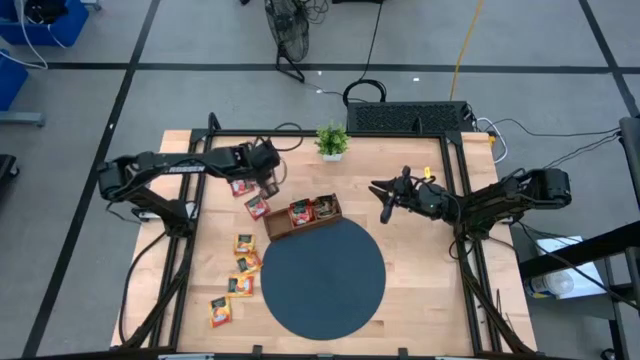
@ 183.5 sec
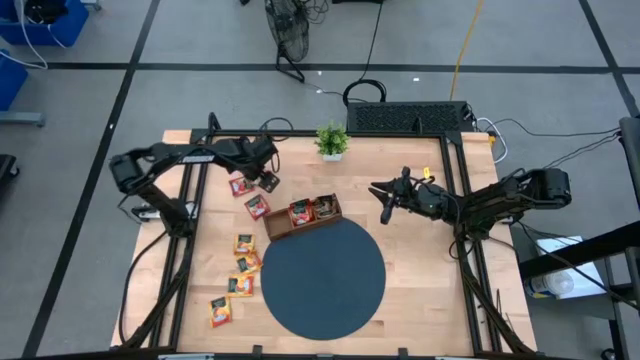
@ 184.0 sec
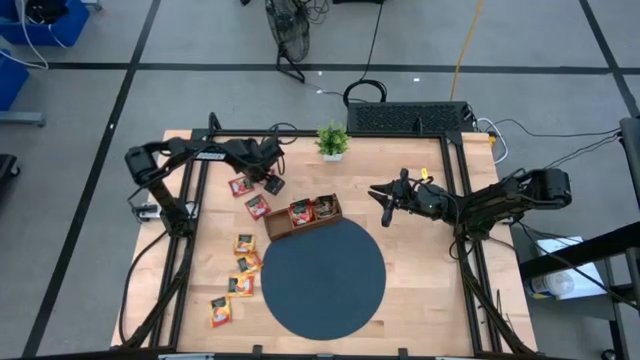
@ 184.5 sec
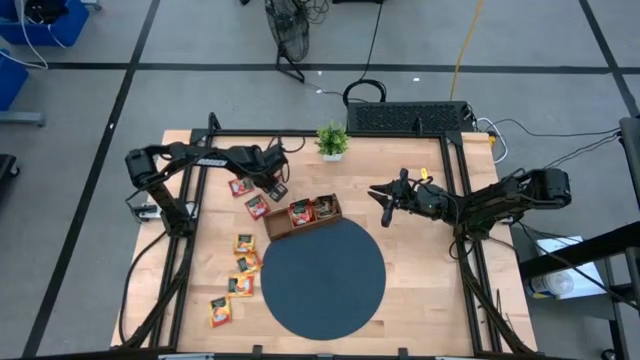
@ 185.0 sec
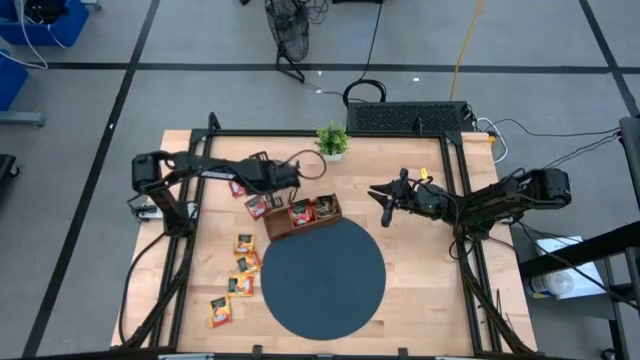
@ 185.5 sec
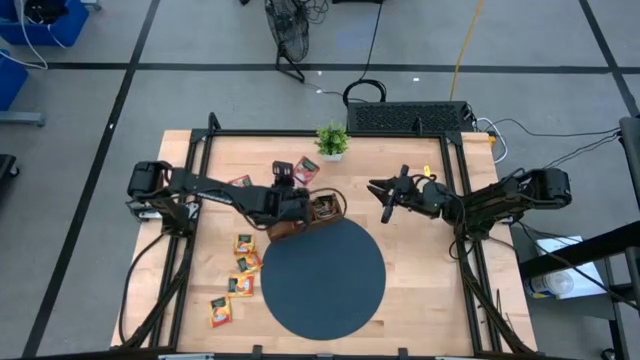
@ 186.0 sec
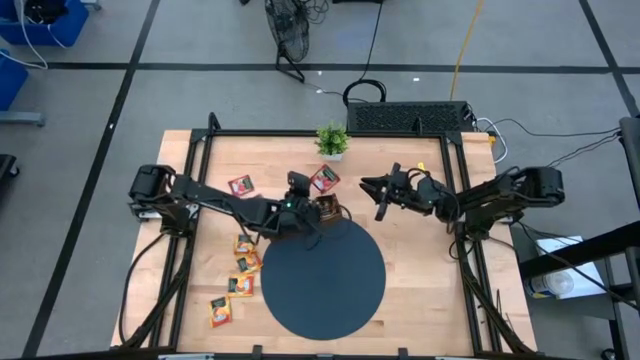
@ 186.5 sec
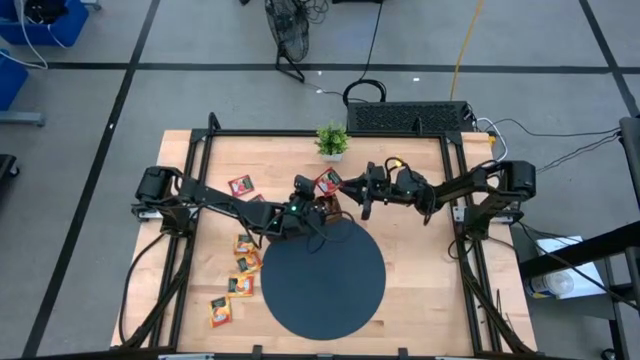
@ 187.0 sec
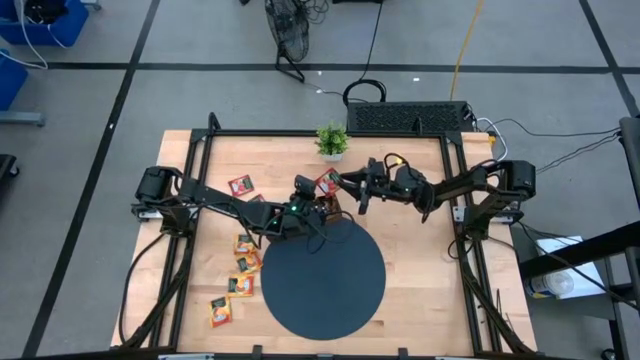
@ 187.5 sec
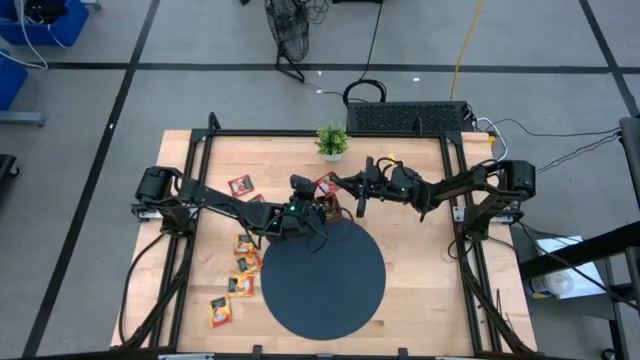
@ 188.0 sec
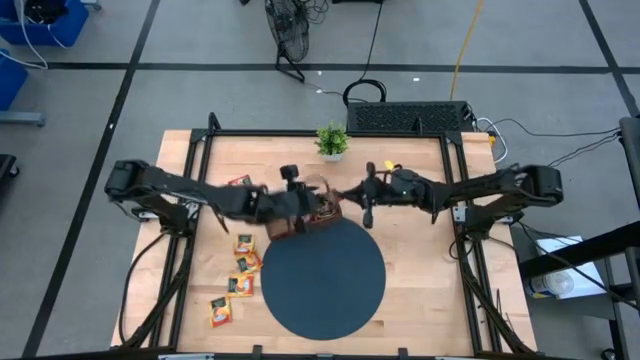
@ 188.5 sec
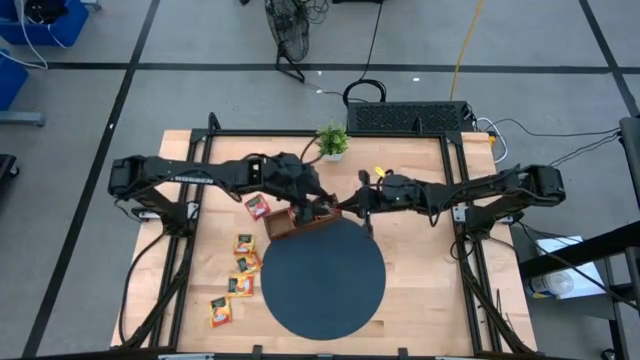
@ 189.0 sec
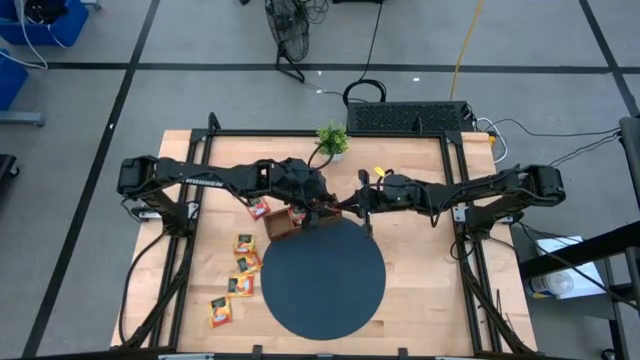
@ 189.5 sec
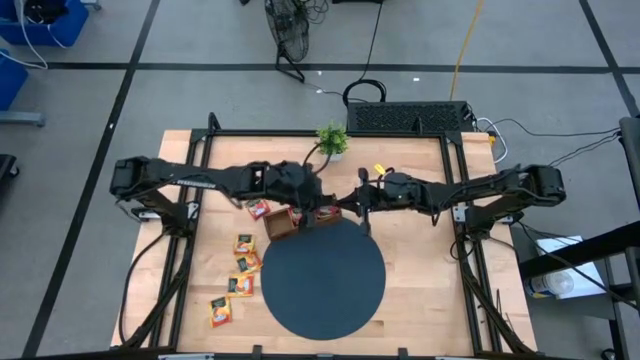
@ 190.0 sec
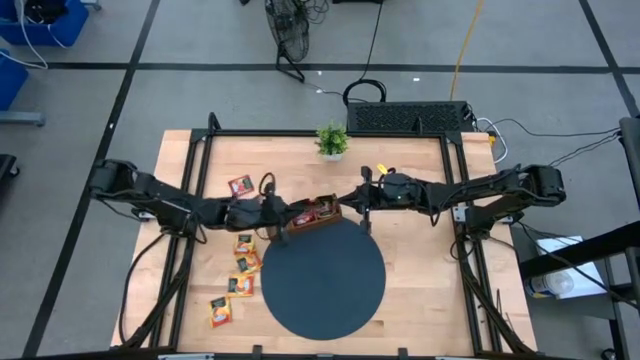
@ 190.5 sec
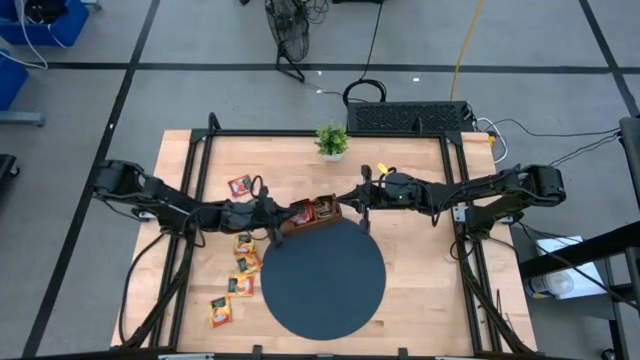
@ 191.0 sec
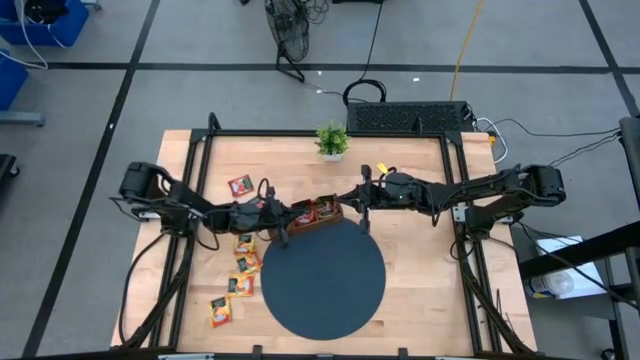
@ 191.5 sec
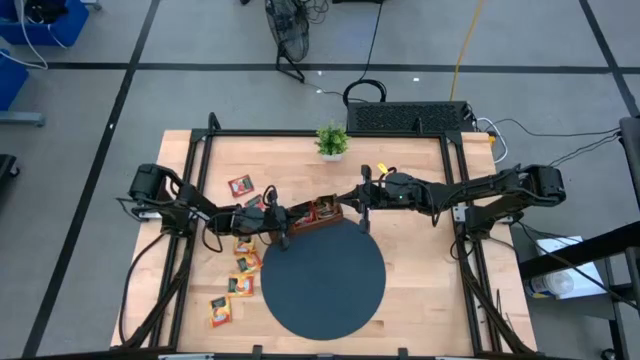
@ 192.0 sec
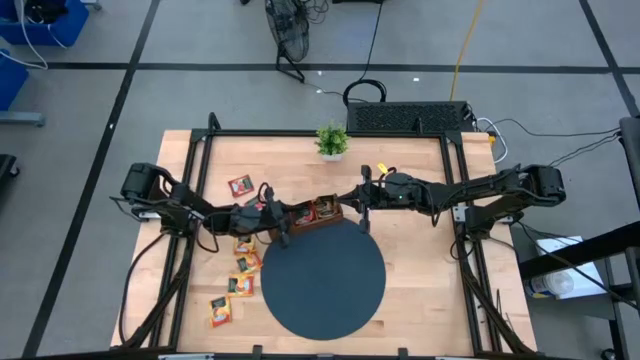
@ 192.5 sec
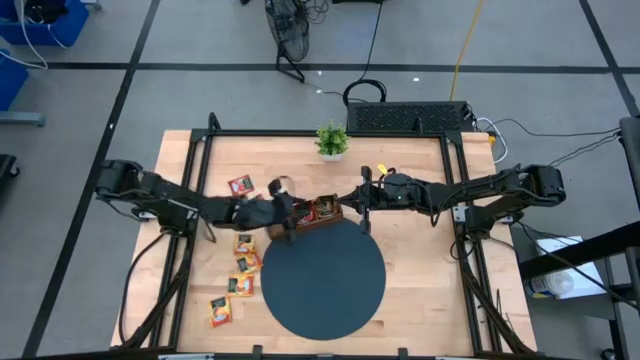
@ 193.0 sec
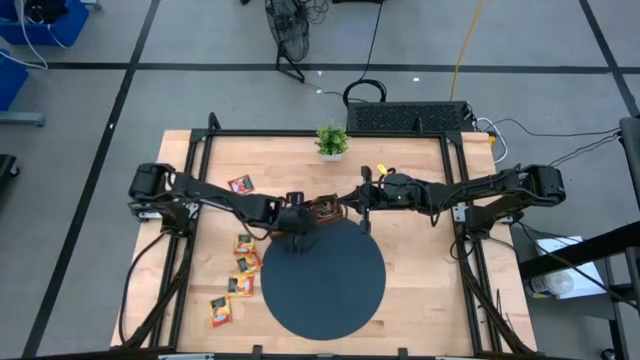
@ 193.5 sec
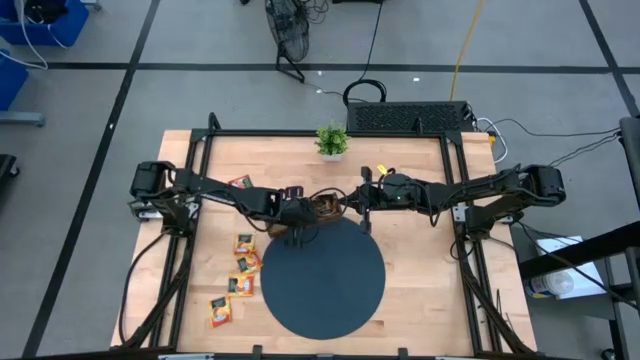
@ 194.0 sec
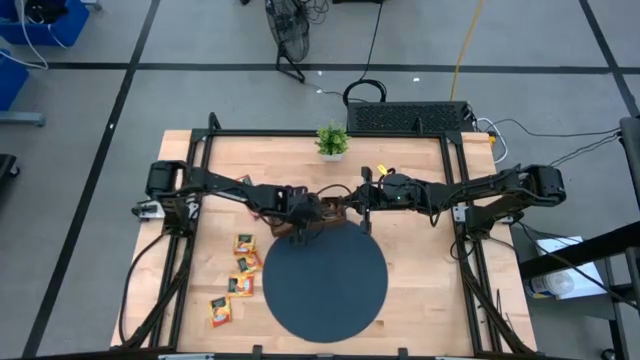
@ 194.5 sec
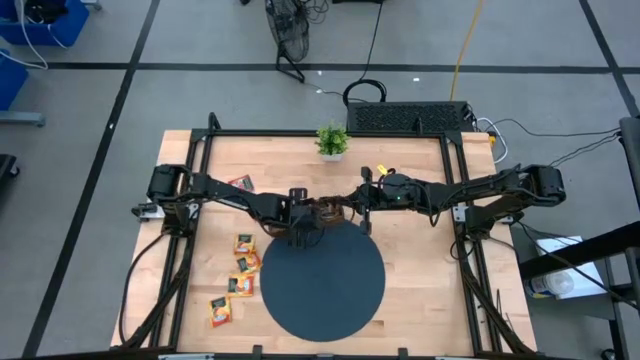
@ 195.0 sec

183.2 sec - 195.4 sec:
Task: Pick & Place Tea
Put the bottom right red tea bag into the middle slot of the wooden organizer

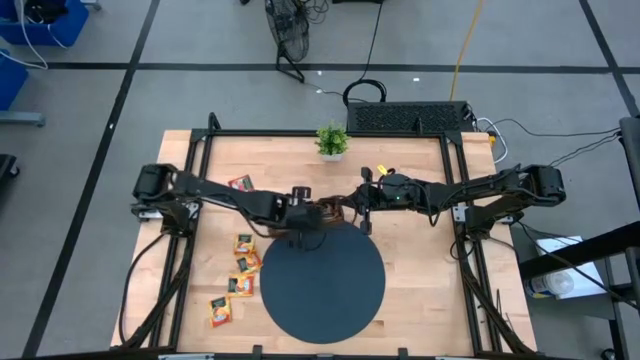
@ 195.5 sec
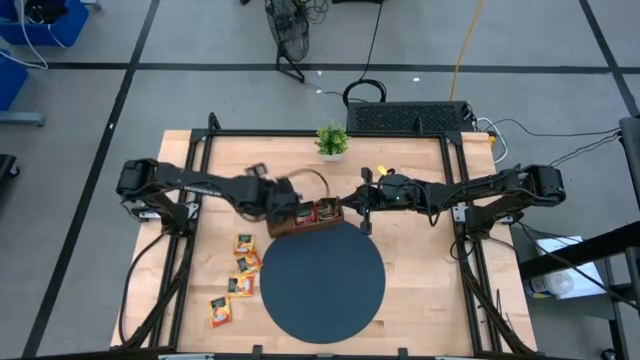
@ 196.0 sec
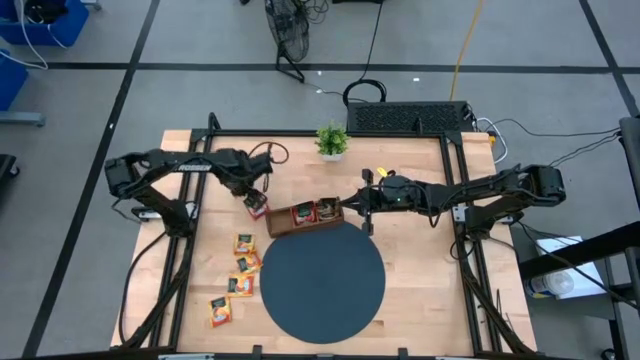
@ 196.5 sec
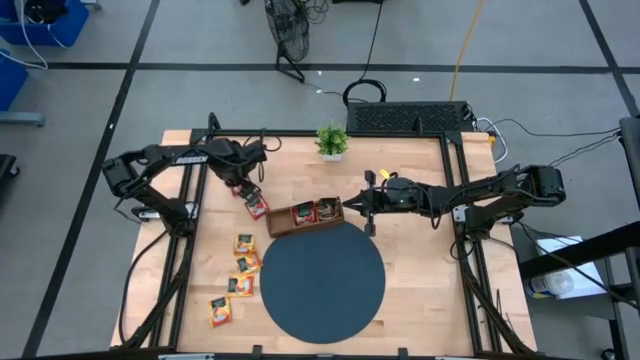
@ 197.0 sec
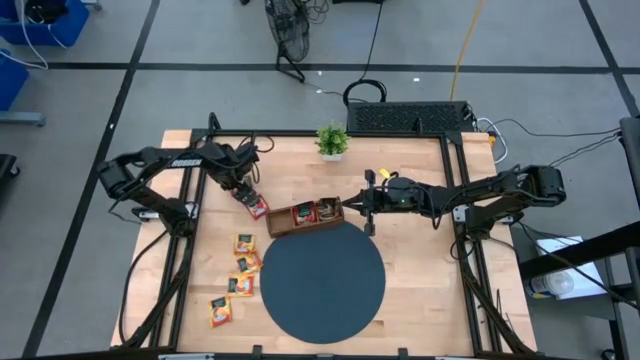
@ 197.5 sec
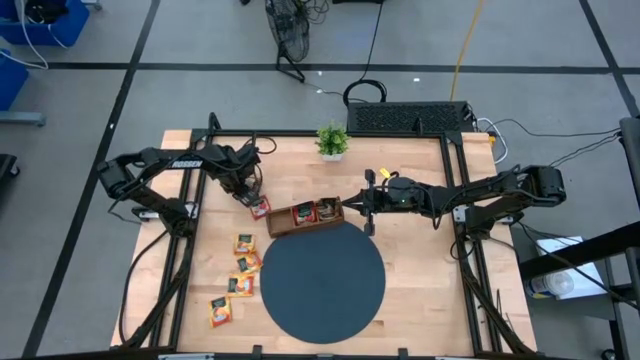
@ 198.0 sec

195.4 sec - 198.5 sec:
Put the top red tea bag into the middle slot of the wooden organizer

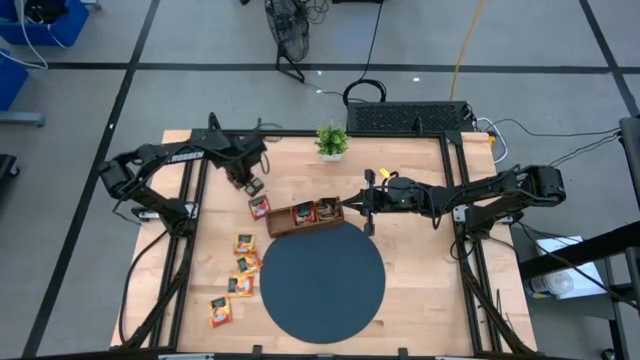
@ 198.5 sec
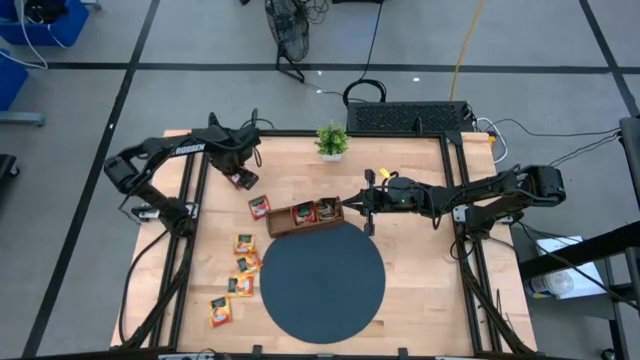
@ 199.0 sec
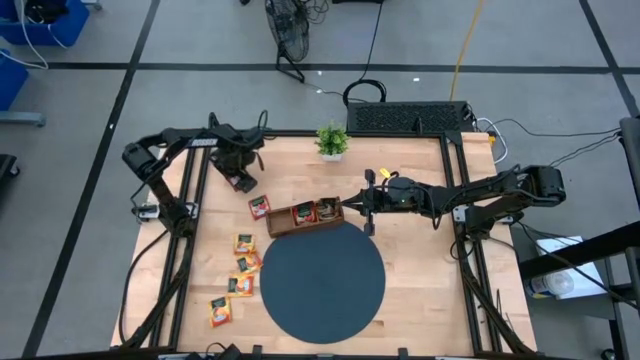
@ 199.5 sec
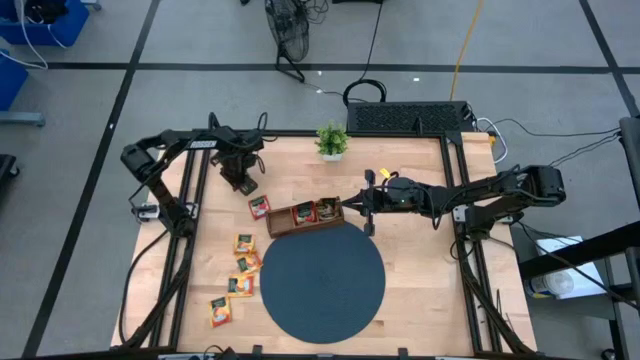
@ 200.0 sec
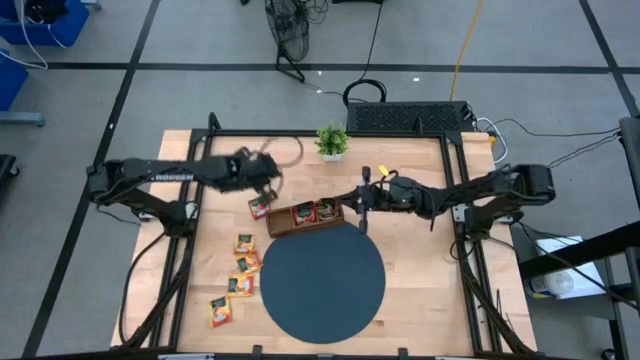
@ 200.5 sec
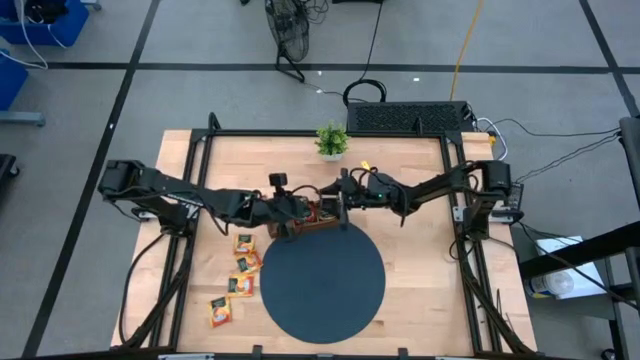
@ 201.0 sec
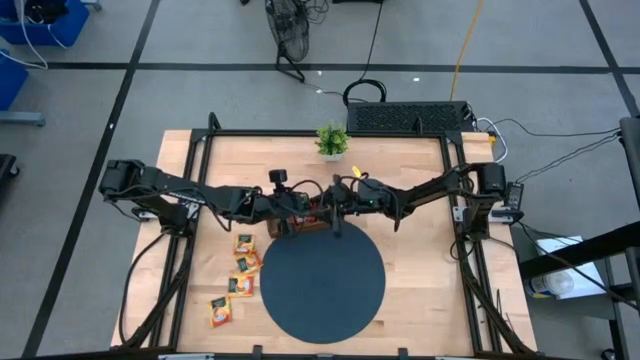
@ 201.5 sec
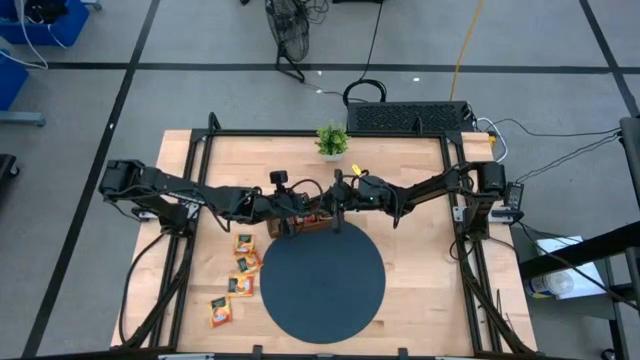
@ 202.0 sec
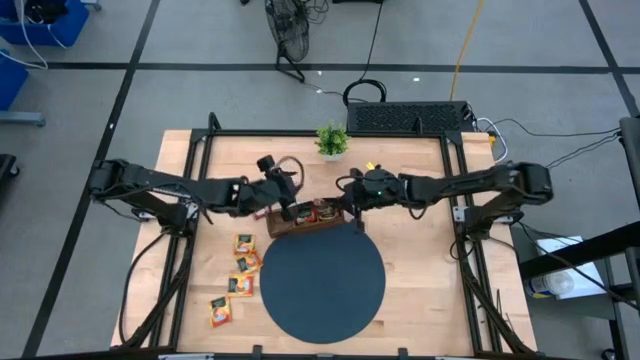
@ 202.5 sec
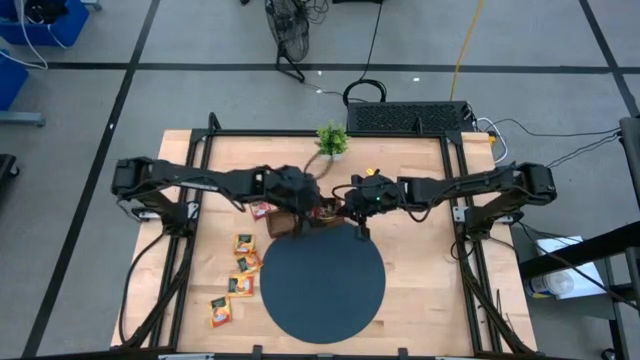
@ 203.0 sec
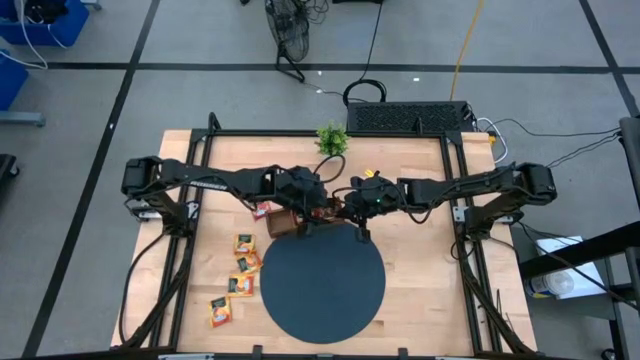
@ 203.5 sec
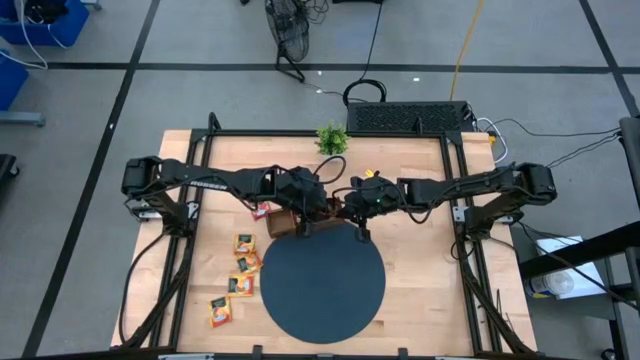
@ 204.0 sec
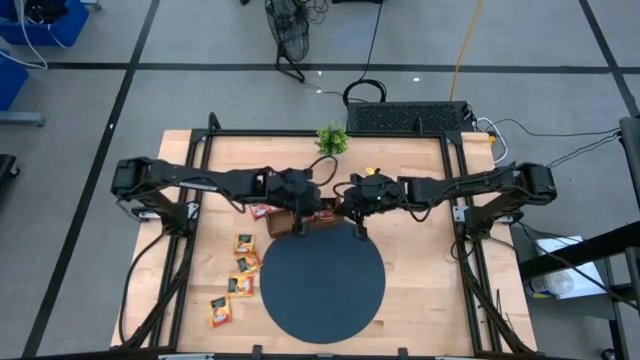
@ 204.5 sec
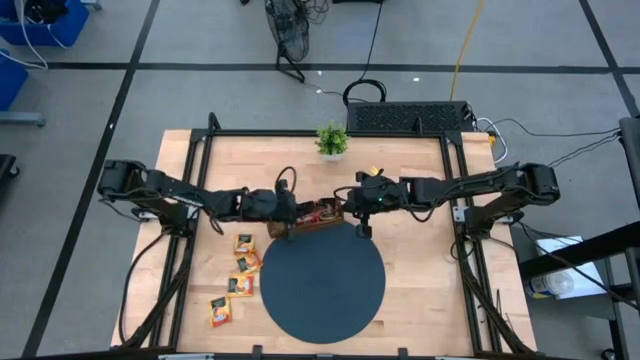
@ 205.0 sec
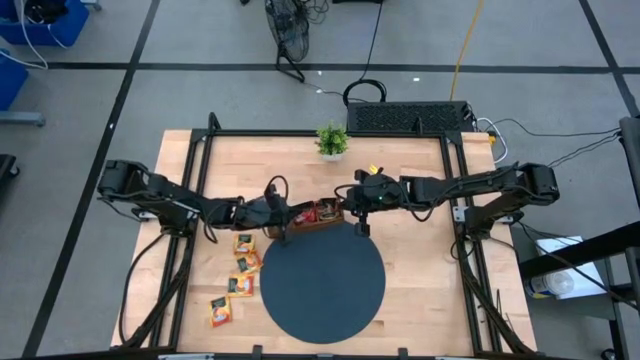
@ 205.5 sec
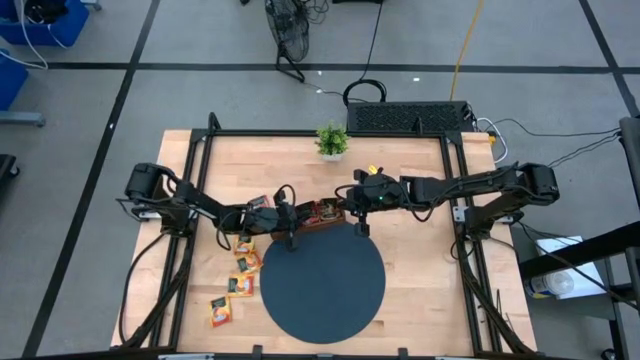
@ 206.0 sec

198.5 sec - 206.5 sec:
Put the top red tea bag into the middle slot of the wooden organizer
